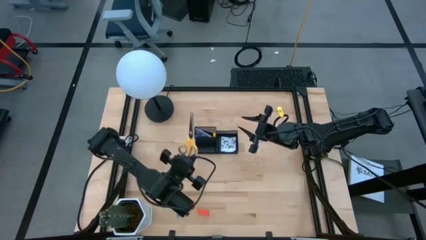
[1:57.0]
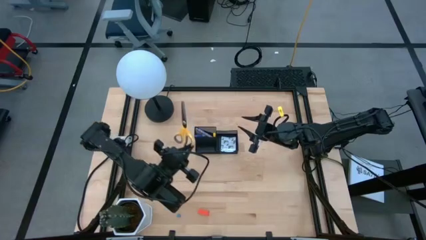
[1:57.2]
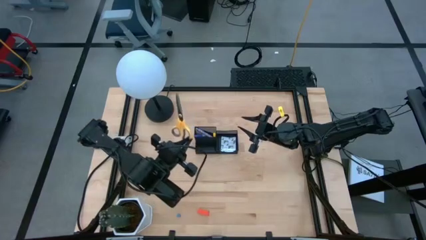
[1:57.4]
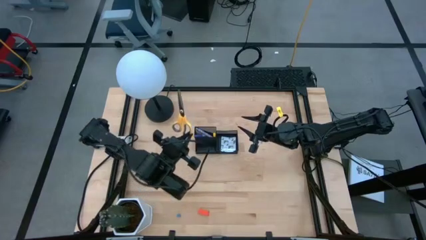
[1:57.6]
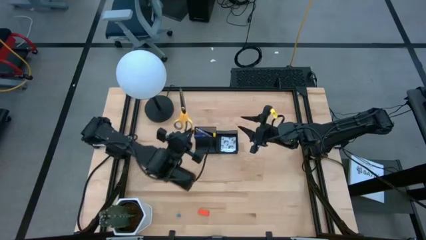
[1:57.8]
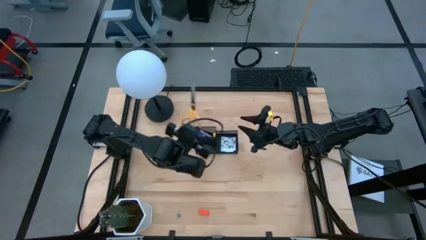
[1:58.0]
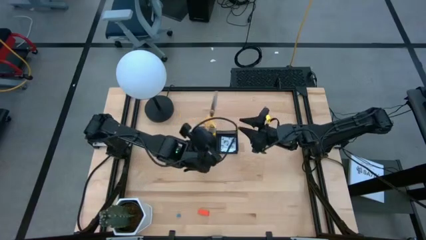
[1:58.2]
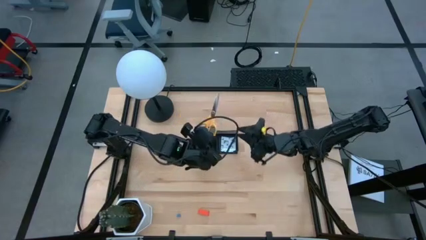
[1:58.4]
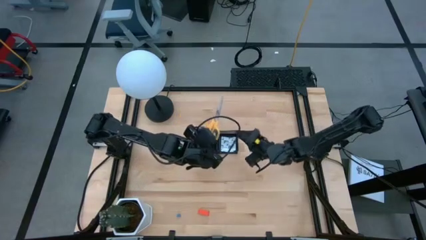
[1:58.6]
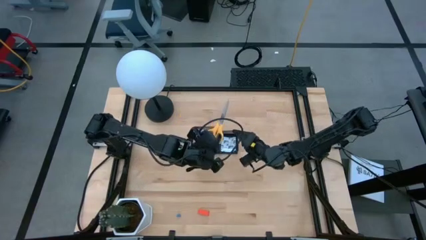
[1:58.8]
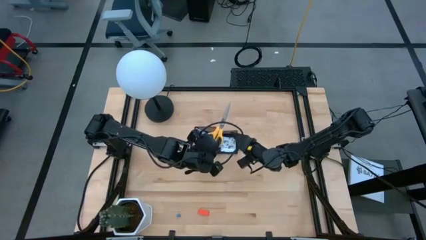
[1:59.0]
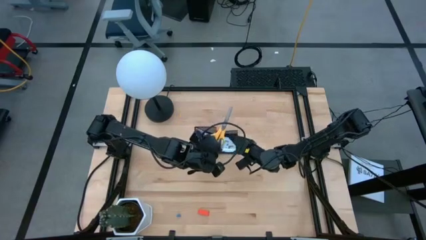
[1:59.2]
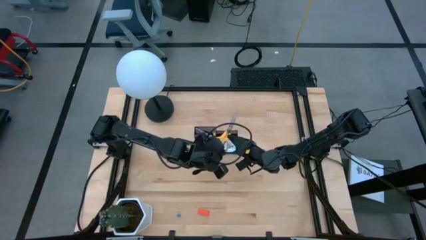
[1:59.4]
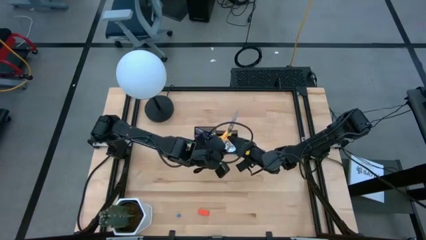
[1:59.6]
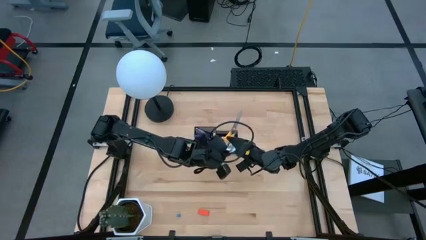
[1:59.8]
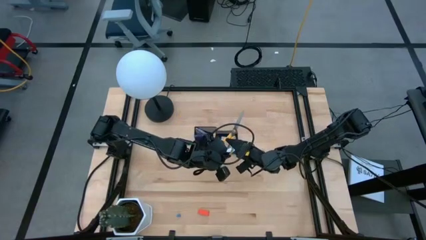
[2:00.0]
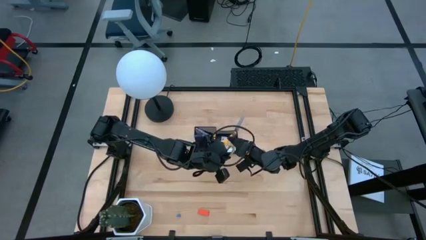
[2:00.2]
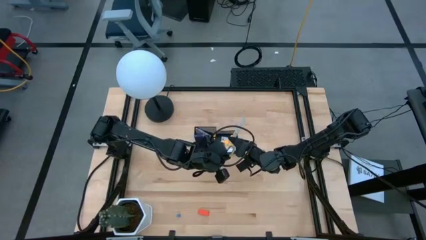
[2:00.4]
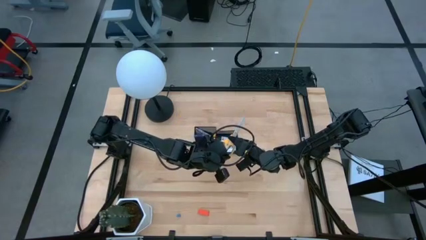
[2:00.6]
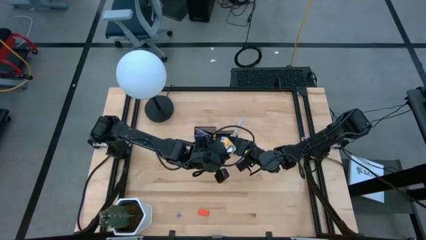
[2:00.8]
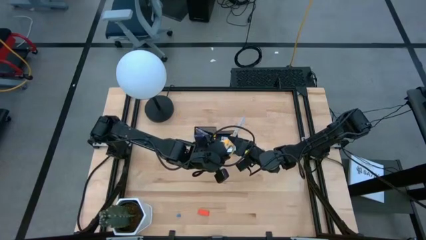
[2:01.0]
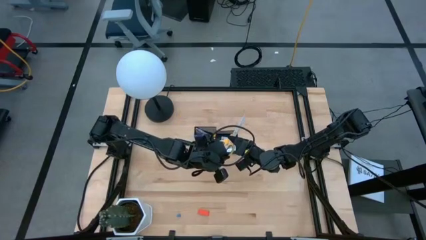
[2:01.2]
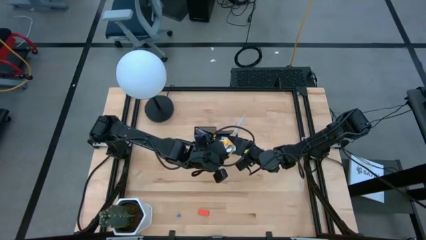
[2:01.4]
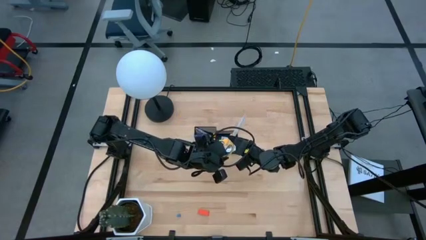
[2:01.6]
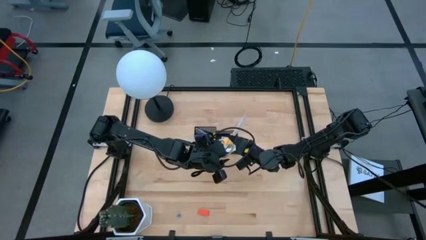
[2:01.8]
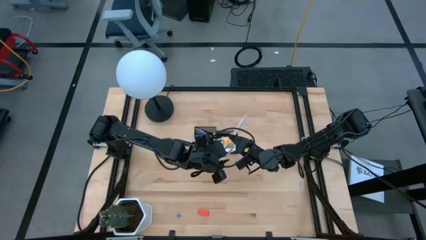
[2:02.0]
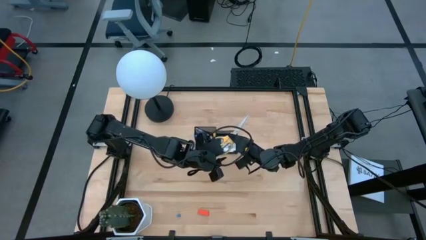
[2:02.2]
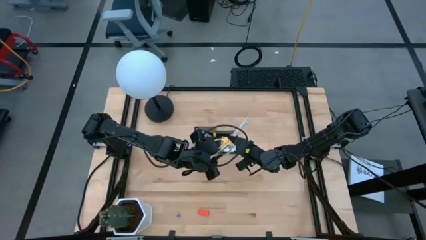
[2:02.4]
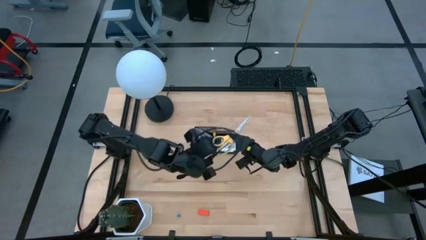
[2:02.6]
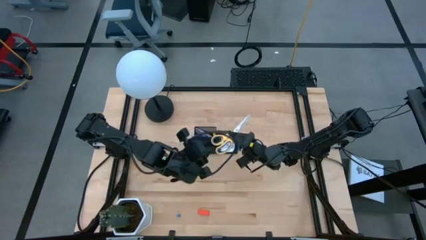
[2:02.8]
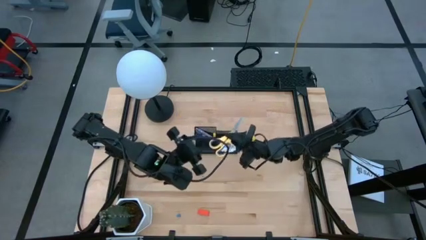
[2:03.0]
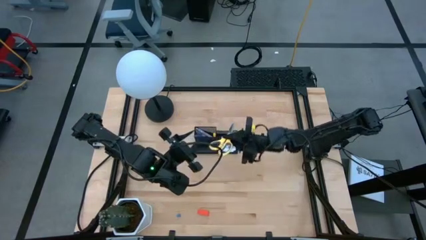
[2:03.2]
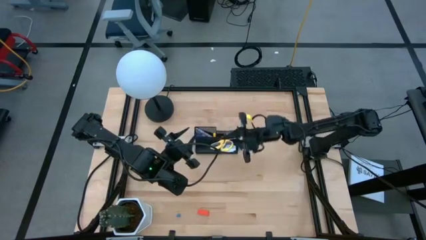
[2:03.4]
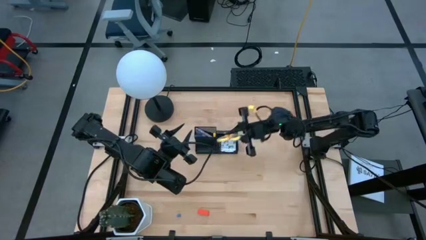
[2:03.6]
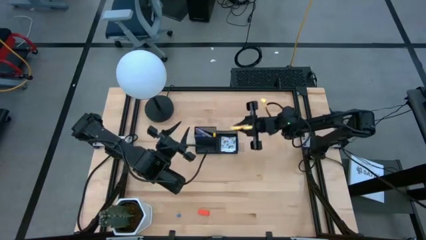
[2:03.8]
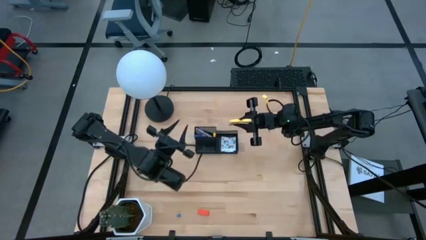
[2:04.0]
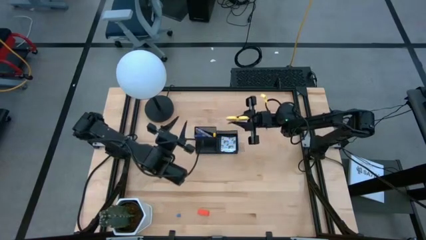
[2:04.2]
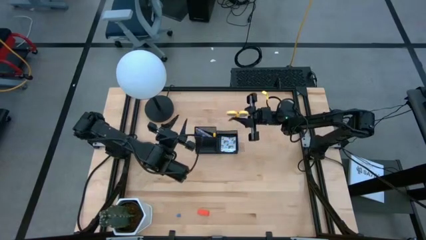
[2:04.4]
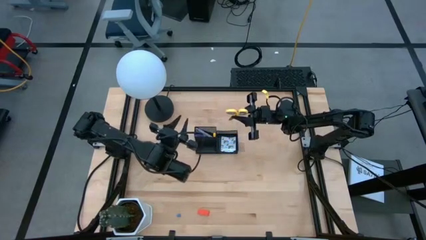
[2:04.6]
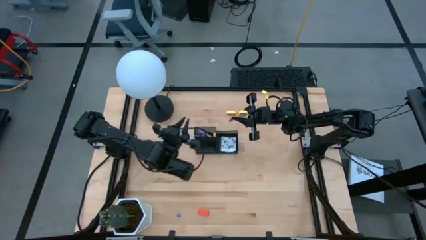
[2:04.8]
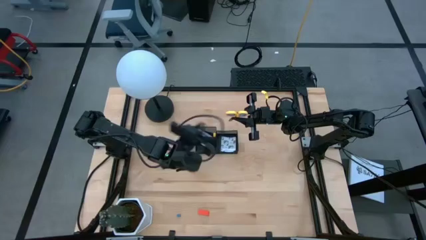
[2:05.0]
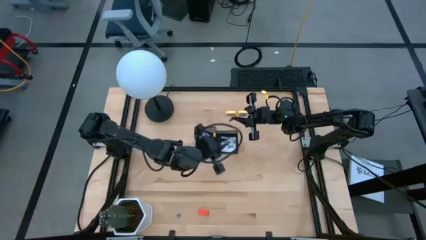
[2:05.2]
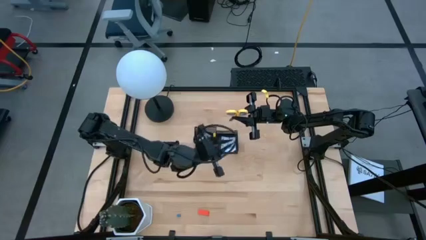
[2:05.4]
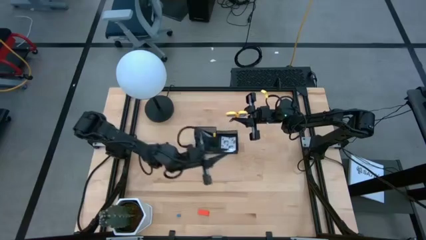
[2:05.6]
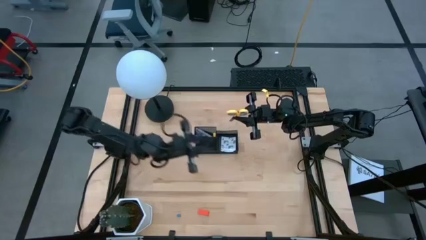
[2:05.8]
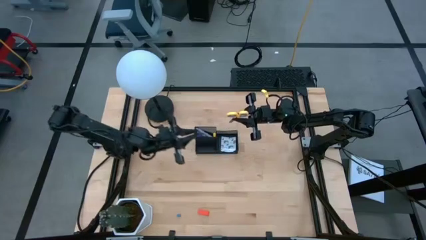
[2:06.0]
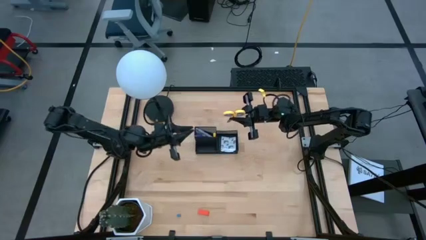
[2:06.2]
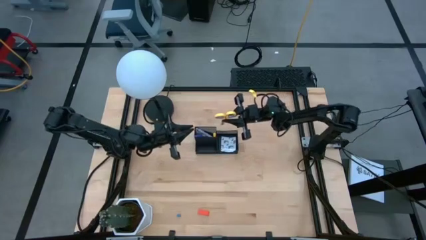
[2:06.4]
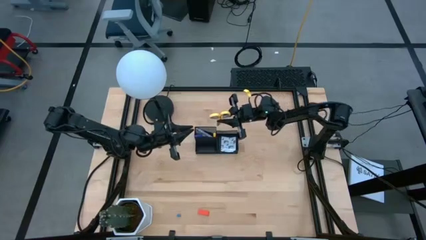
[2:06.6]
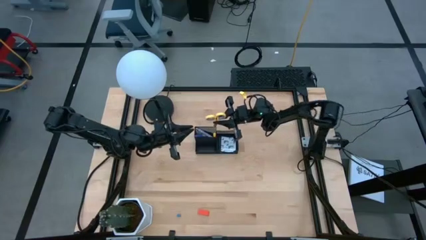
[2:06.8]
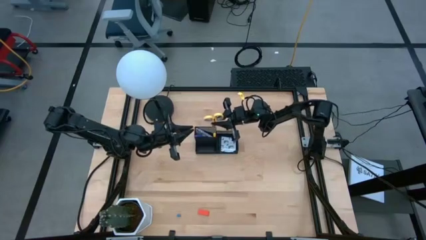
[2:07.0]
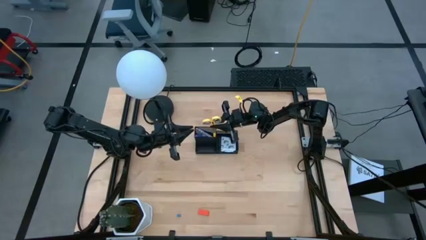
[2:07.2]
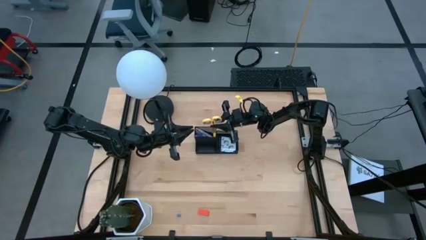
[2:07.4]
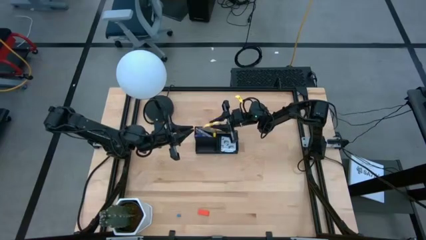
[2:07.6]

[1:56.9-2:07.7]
Task: Pick and place office supplies into organizer
Put the yellow scissors into the desk organizer

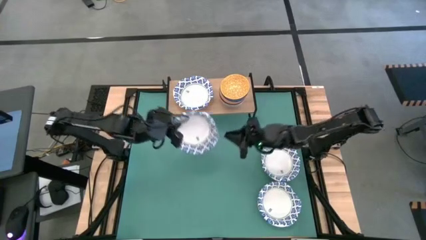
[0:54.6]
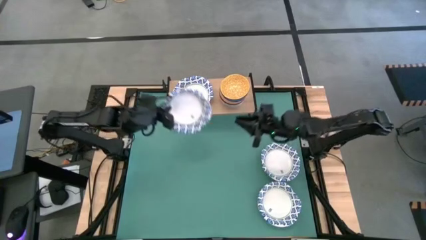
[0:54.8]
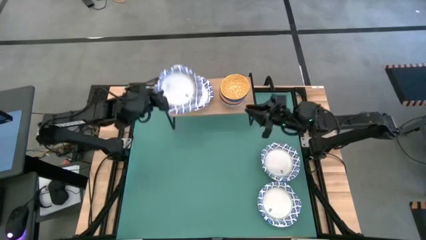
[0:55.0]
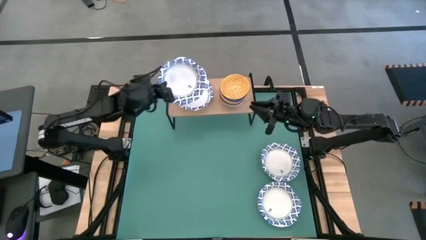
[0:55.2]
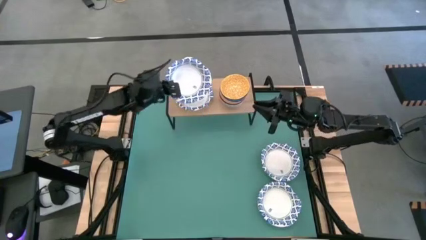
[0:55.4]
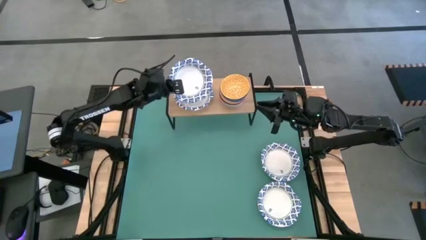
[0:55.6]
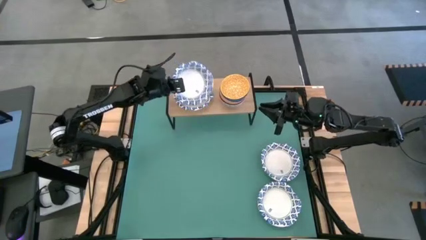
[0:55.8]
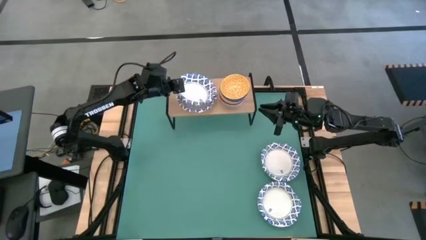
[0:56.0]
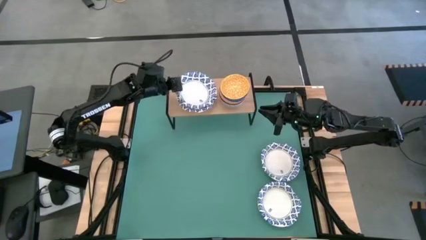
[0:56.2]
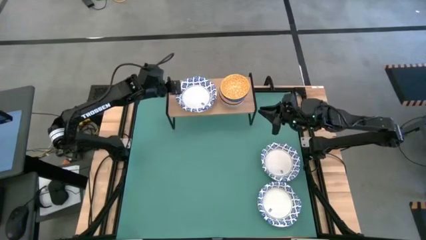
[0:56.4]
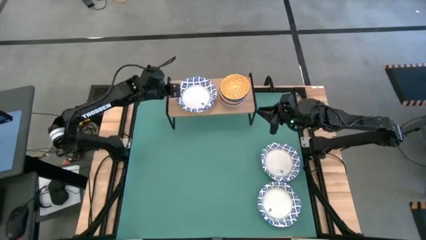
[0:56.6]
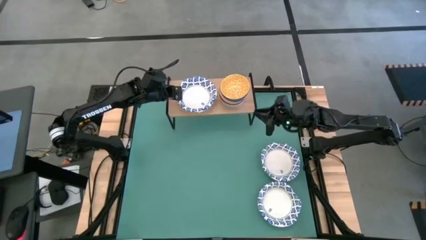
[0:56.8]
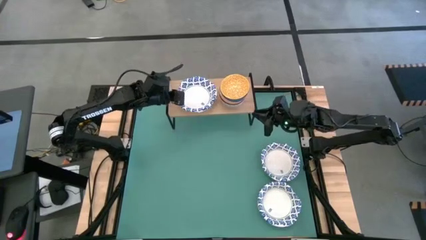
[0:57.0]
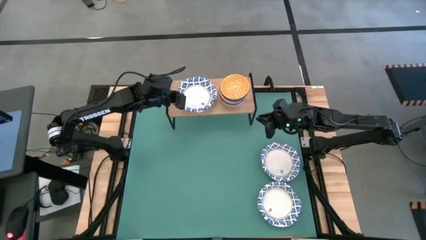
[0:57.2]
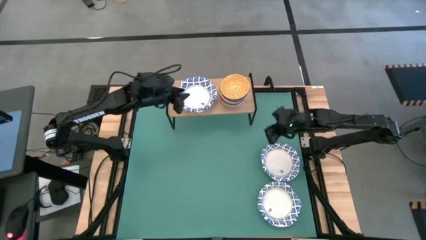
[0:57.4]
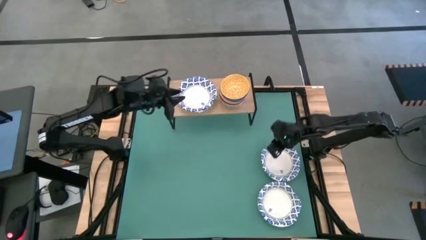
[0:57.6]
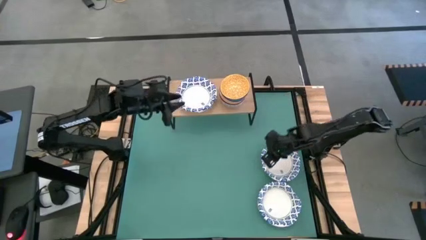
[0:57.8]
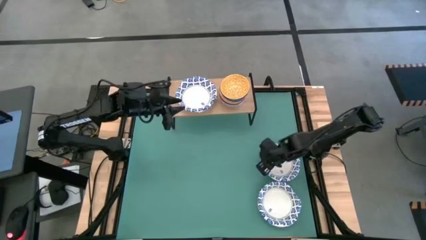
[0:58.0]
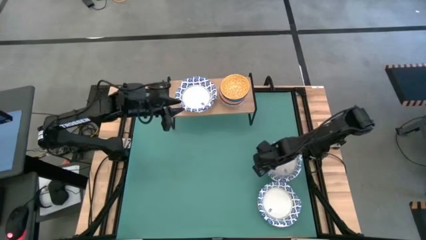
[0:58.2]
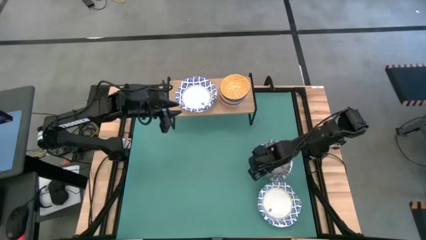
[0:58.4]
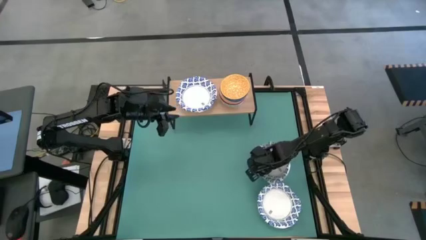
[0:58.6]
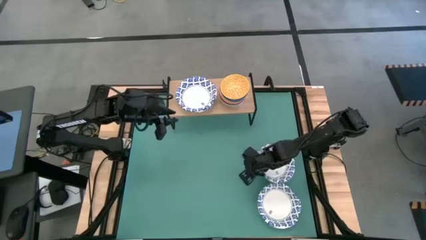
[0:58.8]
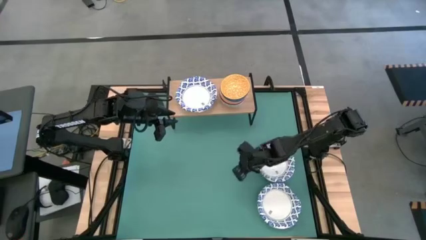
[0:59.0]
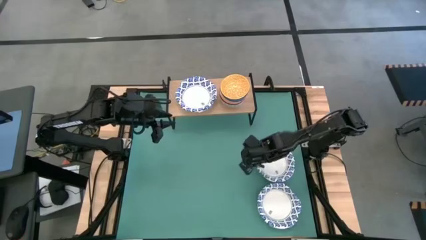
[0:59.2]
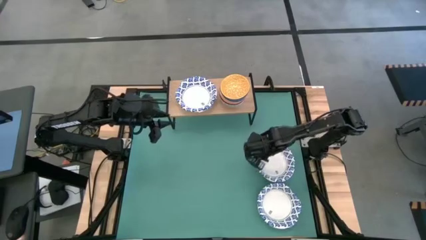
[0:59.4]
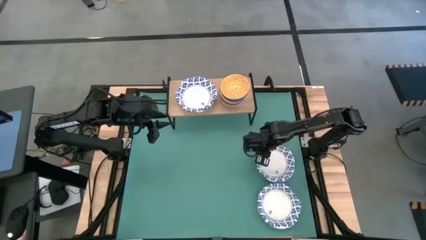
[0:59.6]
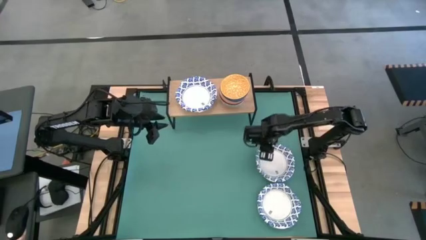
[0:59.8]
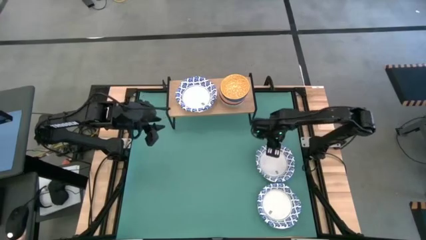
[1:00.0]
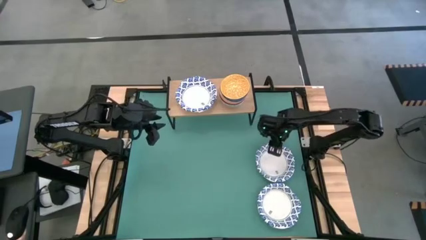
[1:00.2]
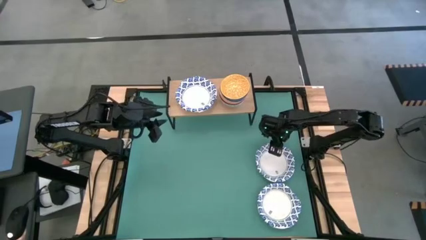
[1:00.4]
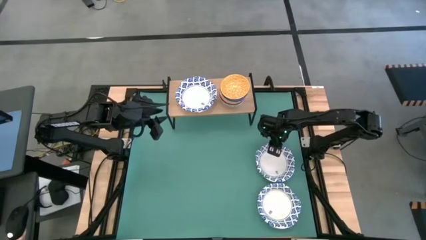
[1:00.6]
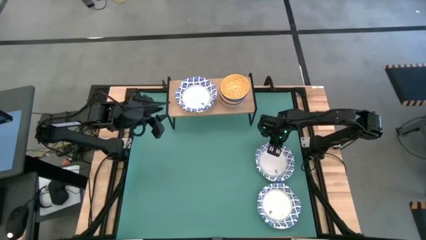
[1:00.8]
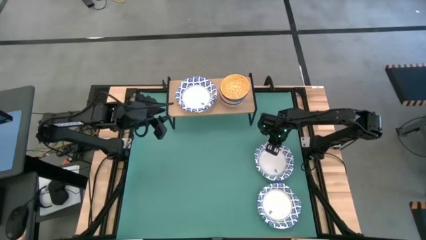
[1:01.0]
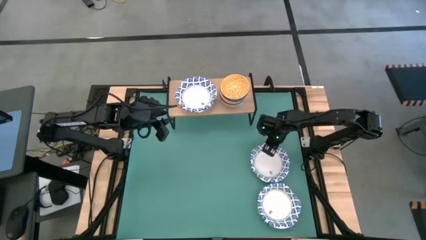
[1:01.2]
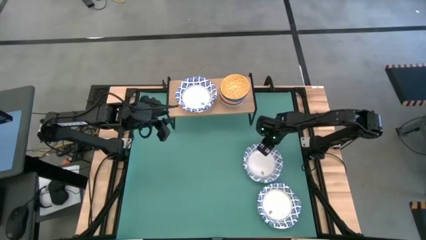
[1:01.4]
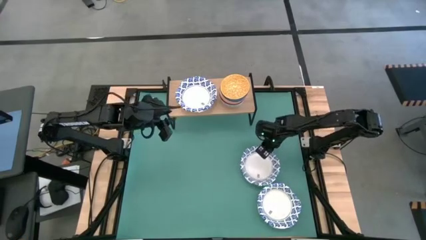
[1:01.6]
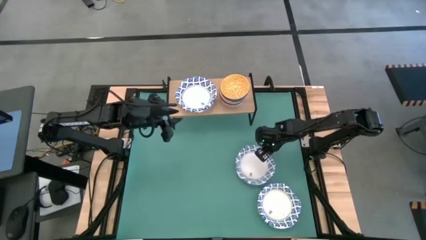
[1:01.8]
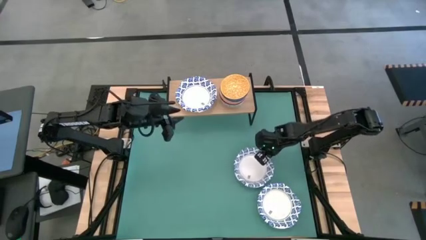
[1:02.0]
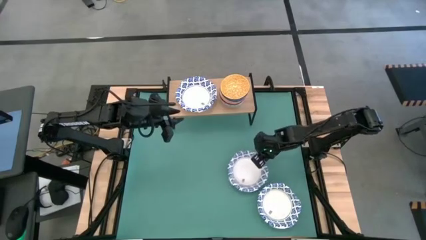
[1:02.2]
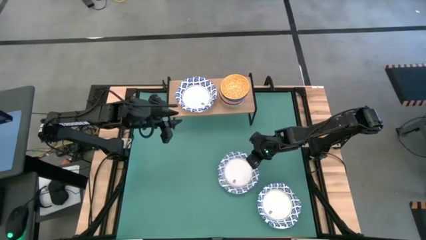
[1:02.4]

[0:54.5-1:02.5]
Task: Place and stack bowls onto a shelf
Stack the white bowl on top of the white bowl on the shelf
